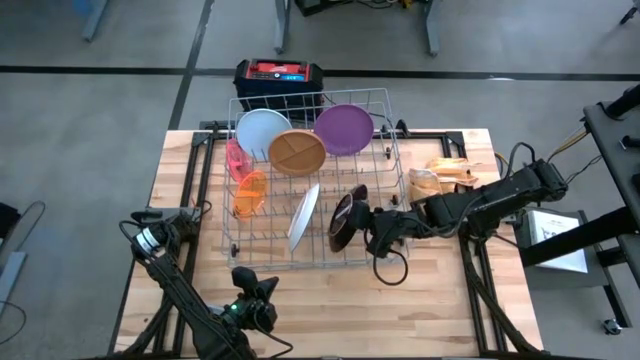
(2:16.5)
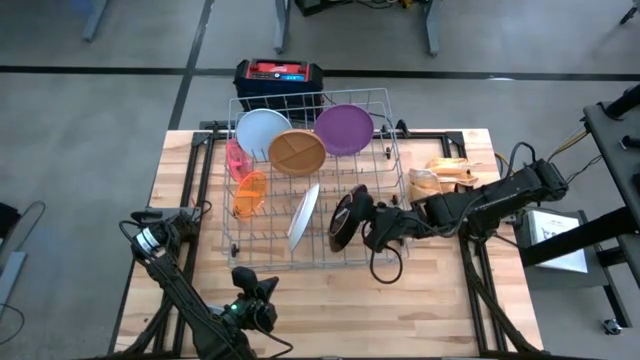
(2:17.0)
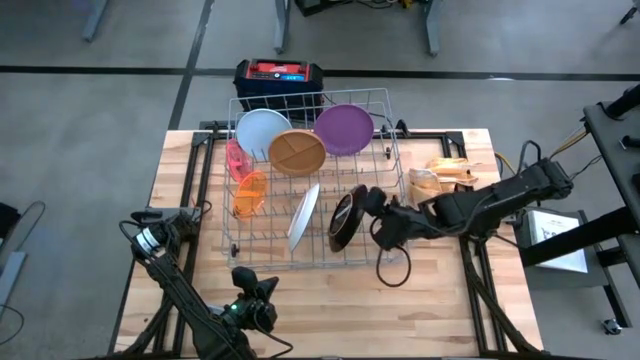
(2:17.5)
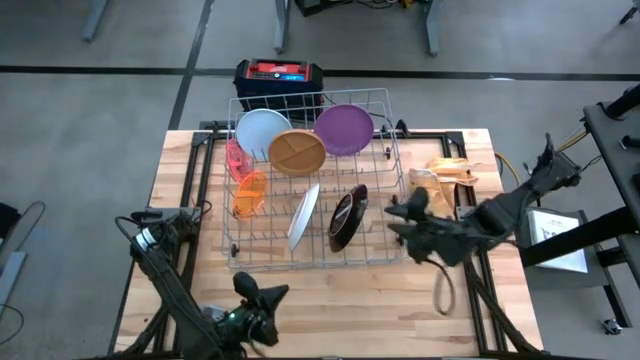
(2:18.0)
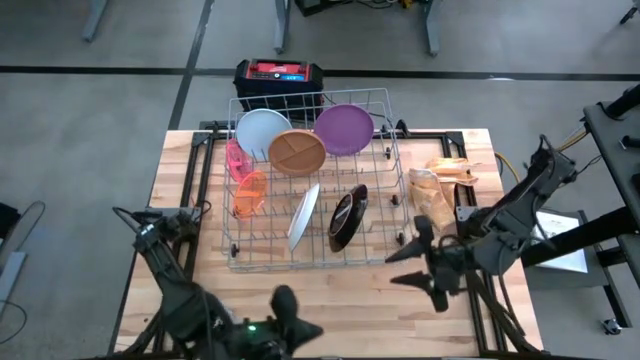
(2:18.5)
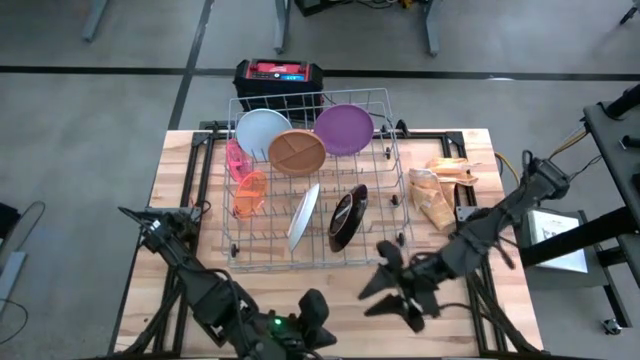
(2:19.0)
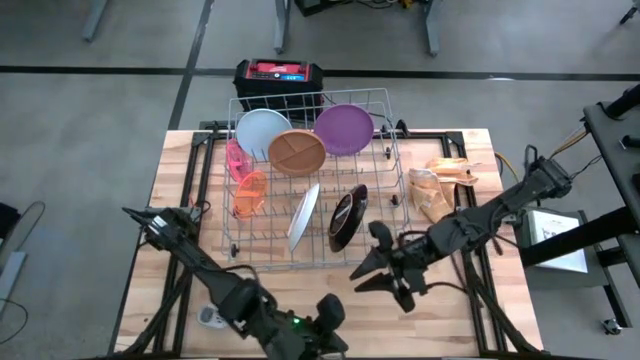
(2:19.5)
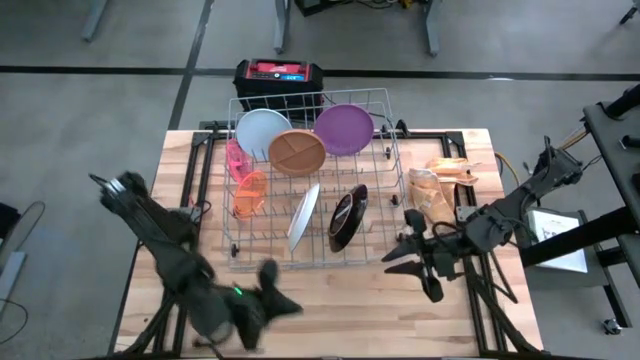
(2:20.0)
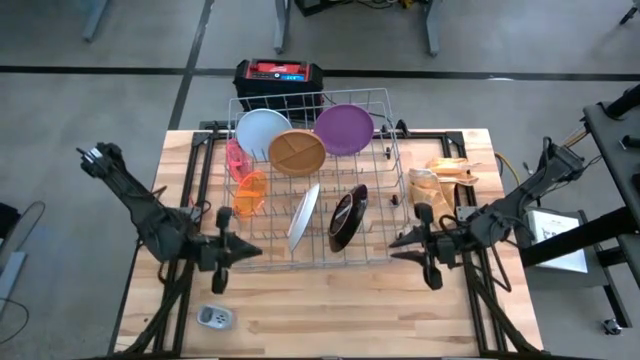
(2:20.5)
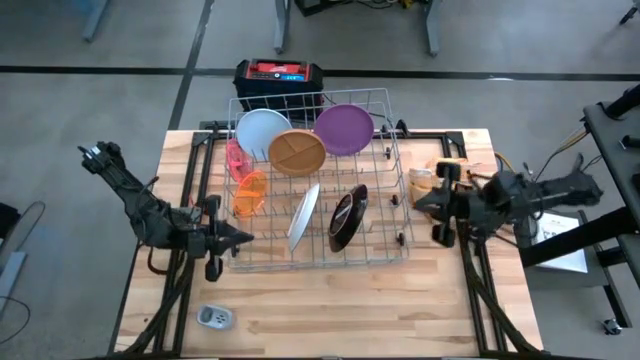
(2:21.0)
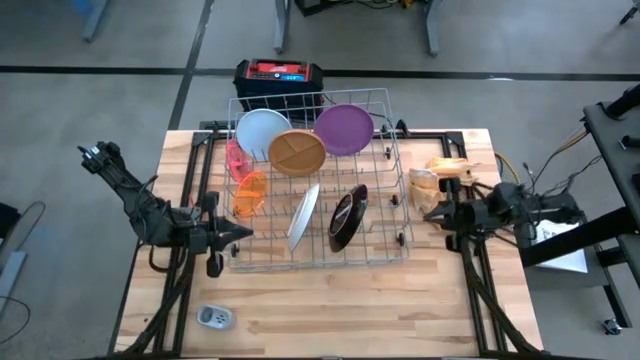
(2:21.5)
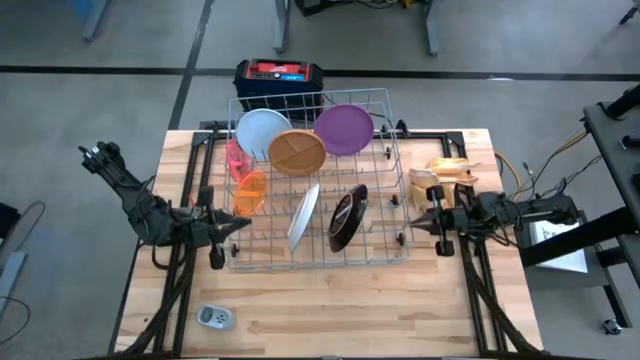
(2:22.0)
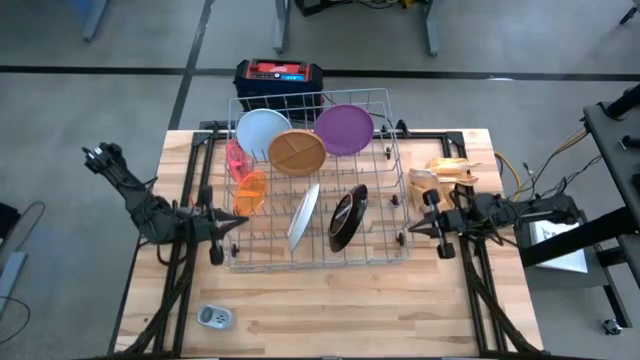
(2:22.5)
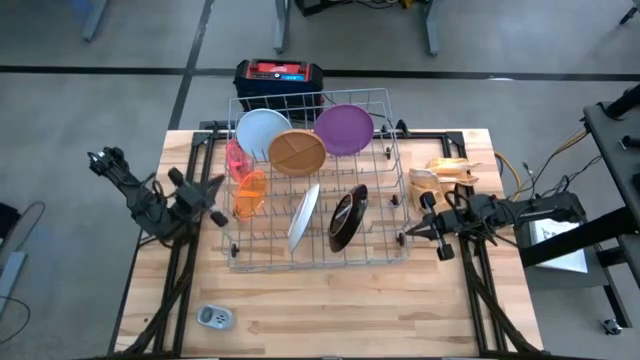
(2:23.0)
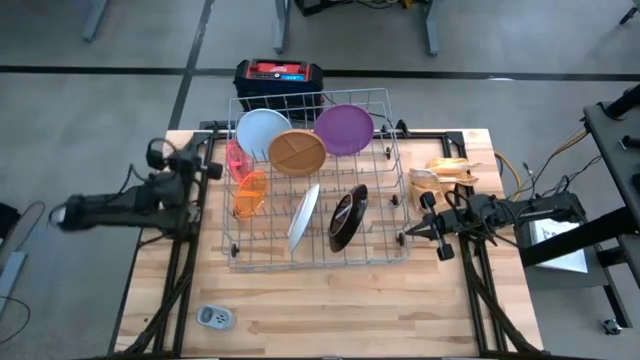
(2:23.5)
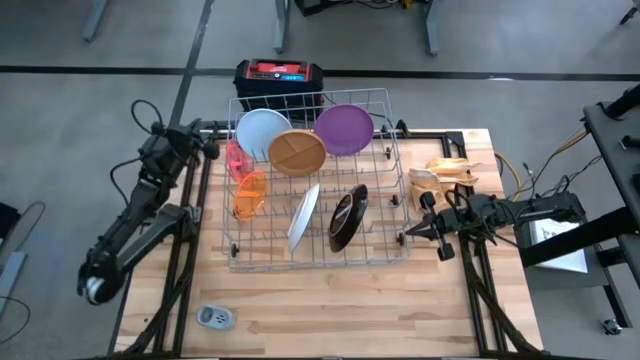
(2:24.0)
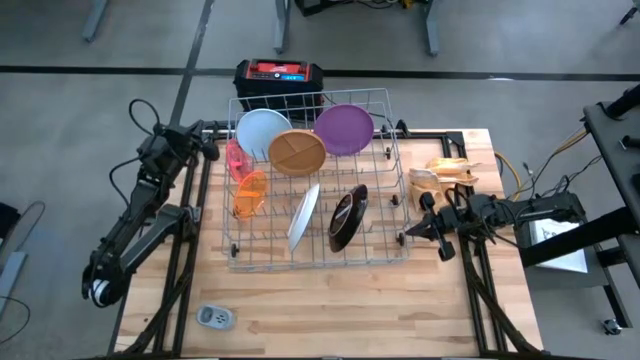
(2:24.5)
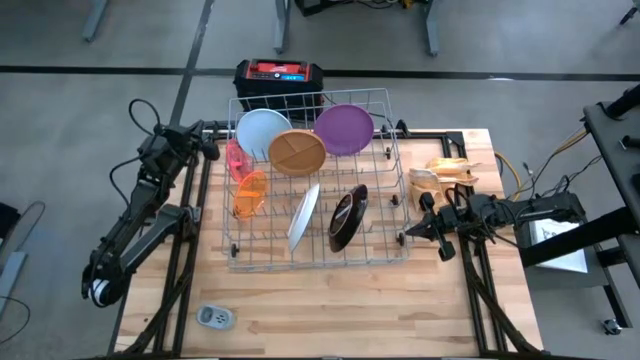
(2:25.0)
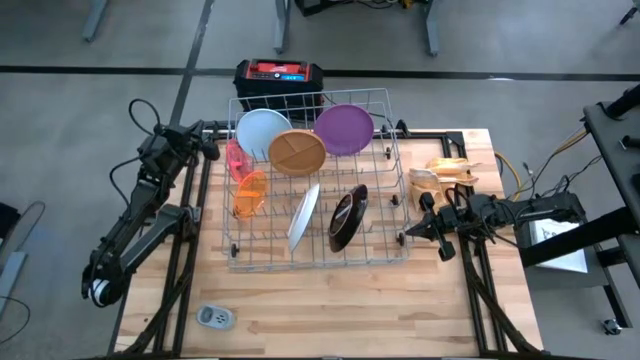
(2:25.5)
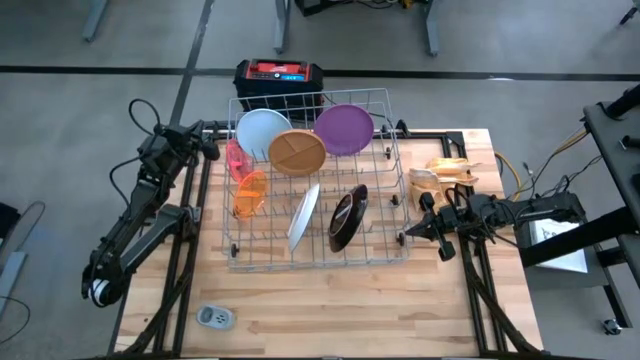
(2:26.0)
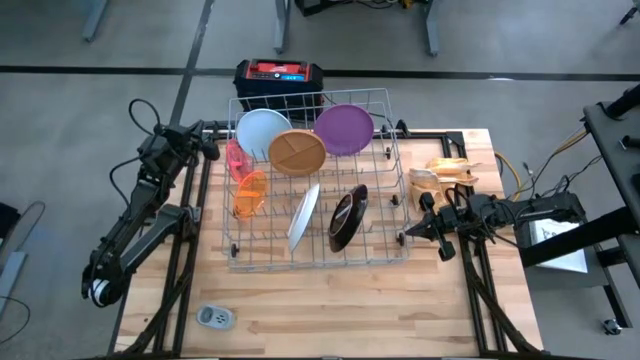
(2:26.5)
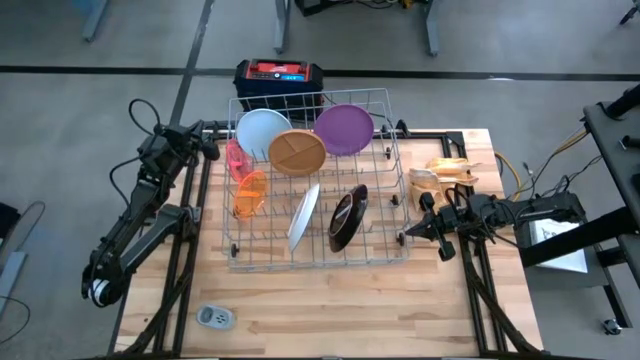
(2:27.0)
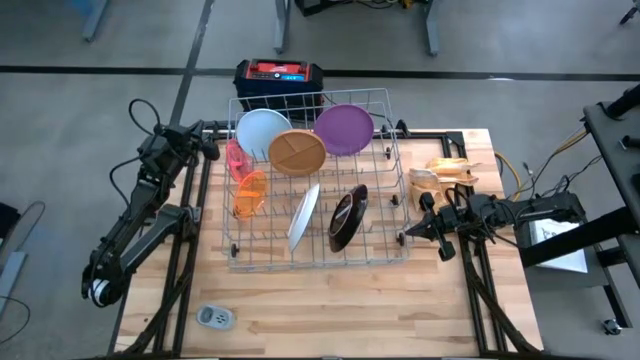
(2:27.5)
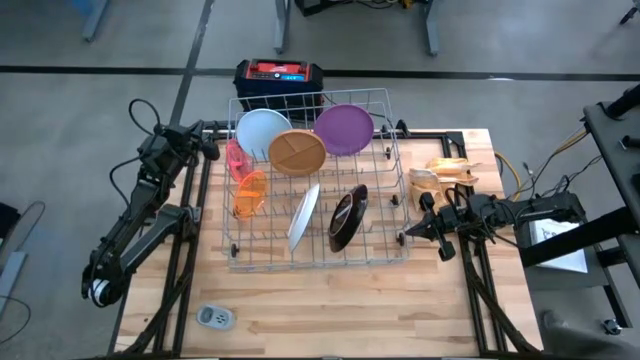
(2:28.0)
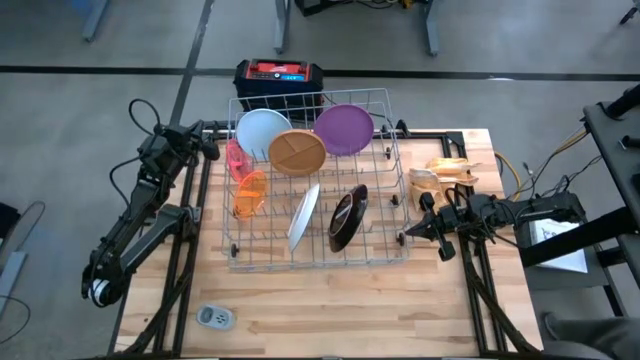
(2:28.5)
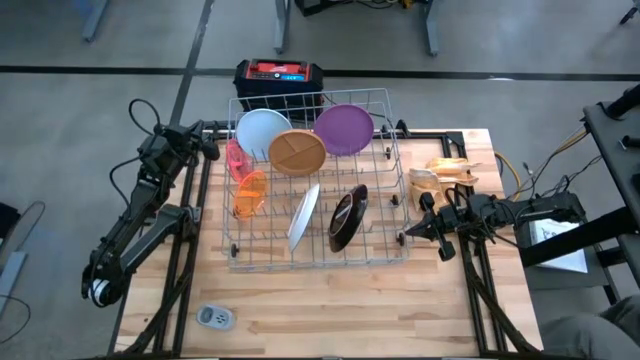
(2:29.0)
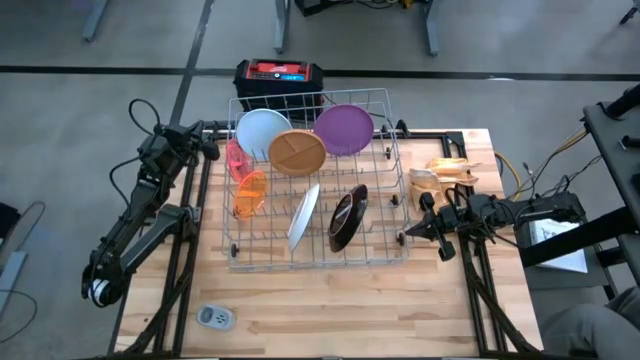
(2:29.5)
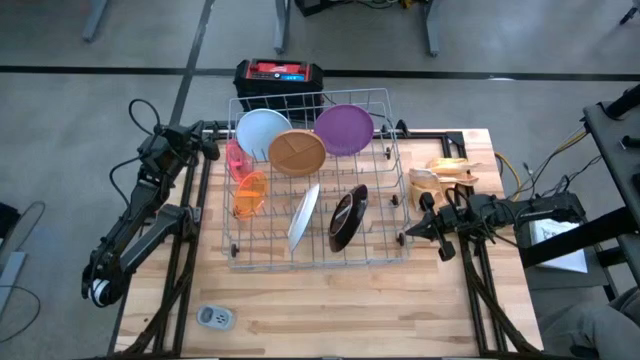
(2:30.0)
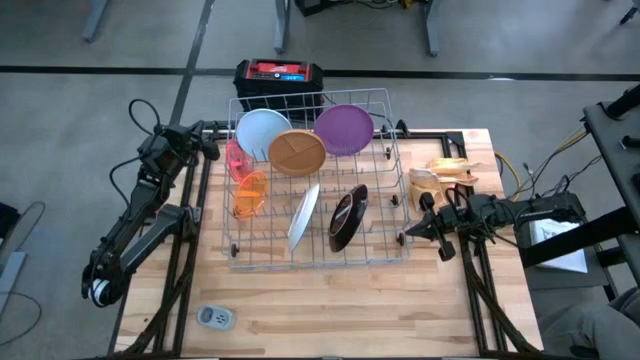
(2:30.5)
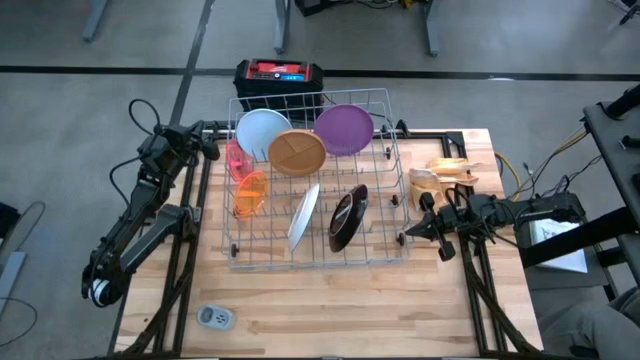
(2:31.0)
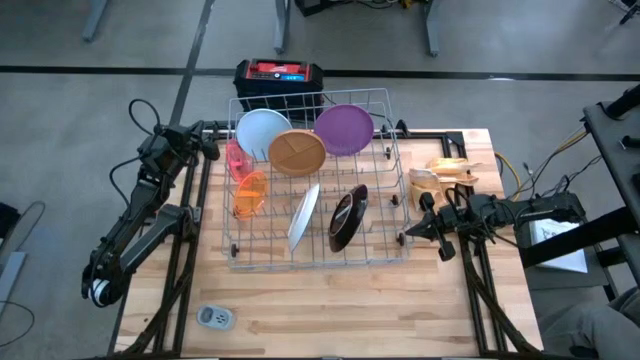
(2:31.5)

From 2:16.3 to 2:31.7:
Task: Sort dishes
Return to Home Position

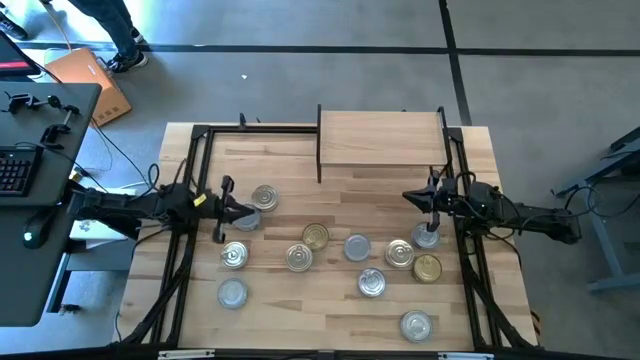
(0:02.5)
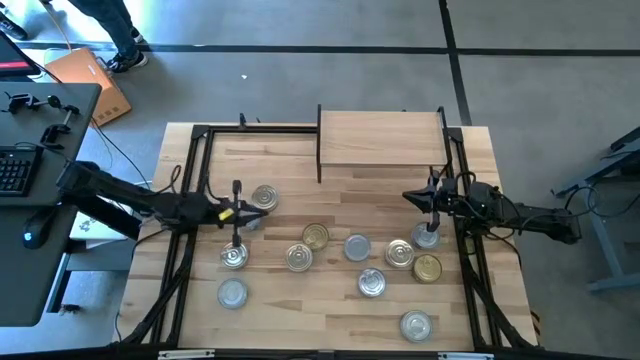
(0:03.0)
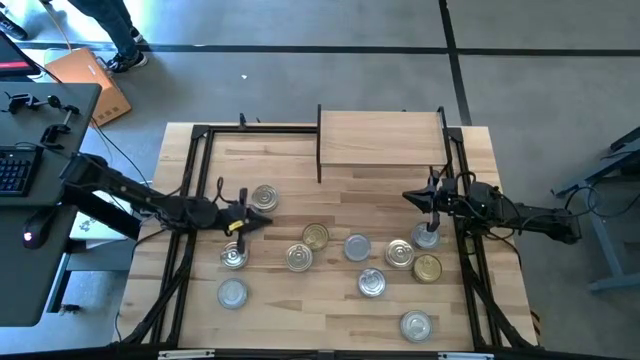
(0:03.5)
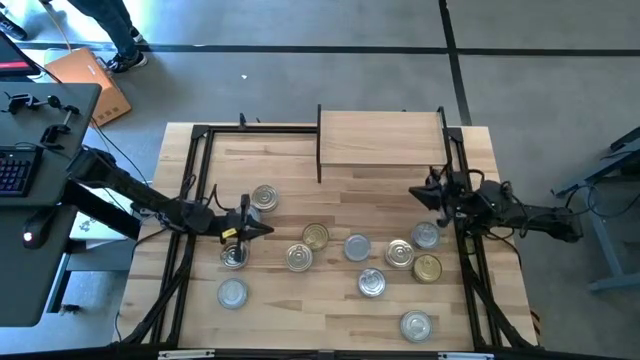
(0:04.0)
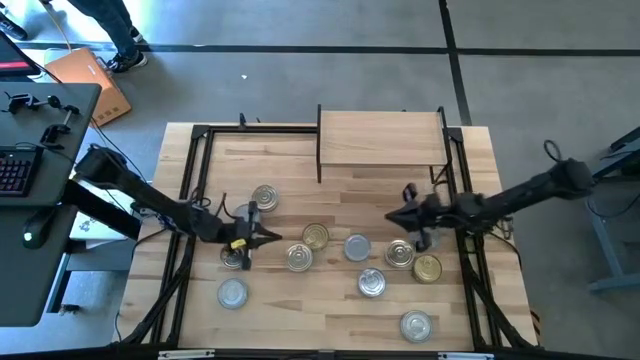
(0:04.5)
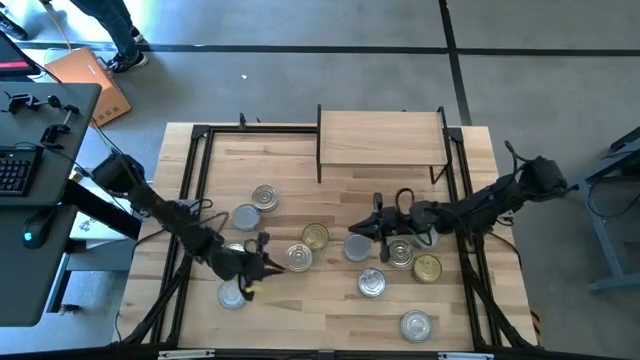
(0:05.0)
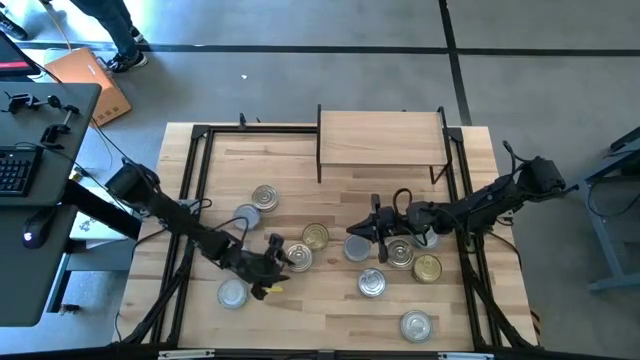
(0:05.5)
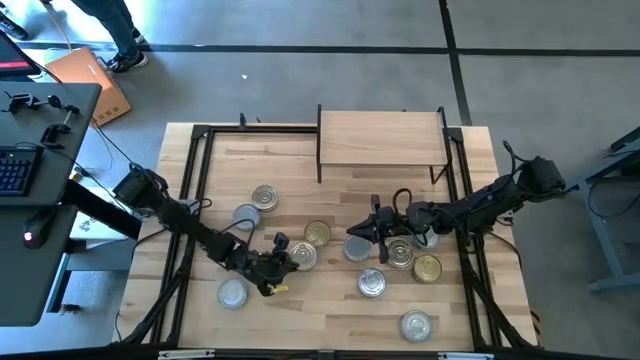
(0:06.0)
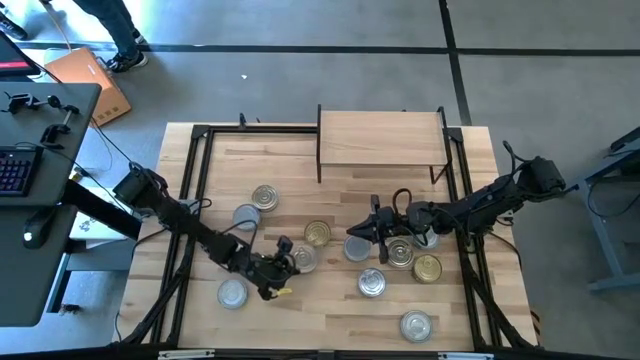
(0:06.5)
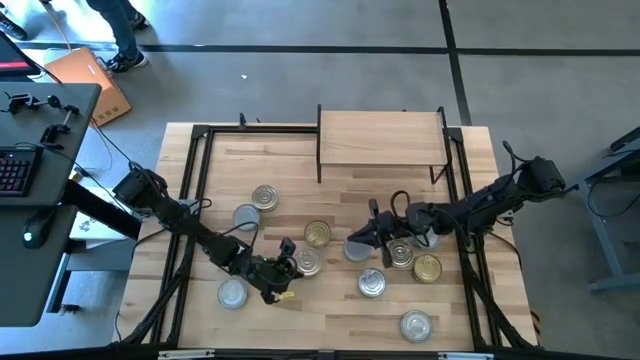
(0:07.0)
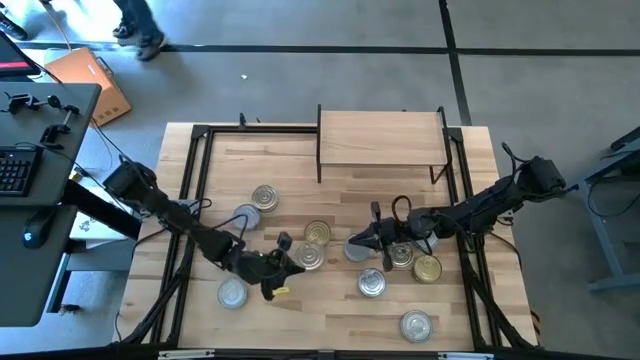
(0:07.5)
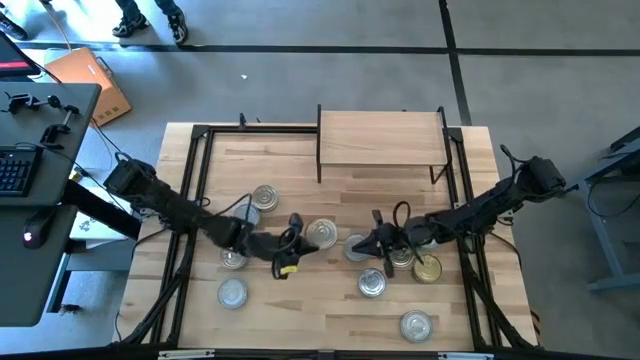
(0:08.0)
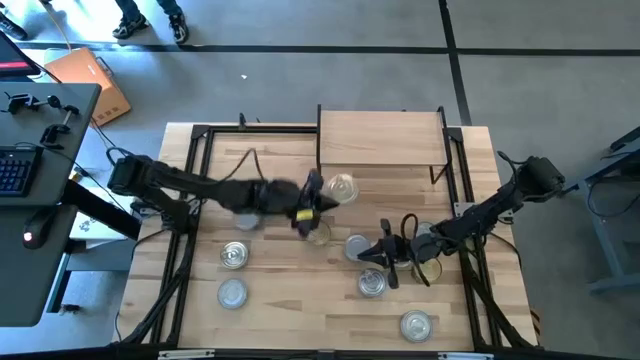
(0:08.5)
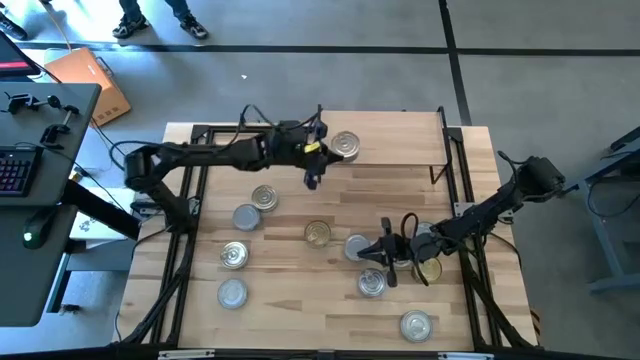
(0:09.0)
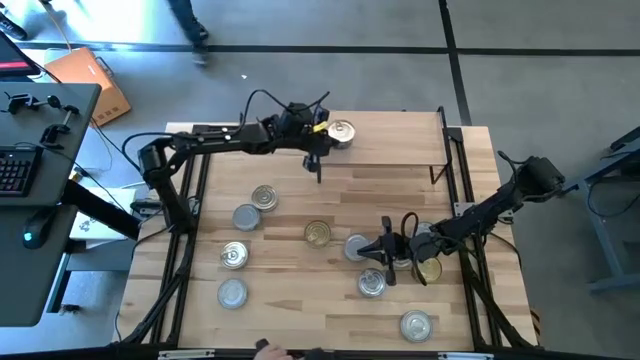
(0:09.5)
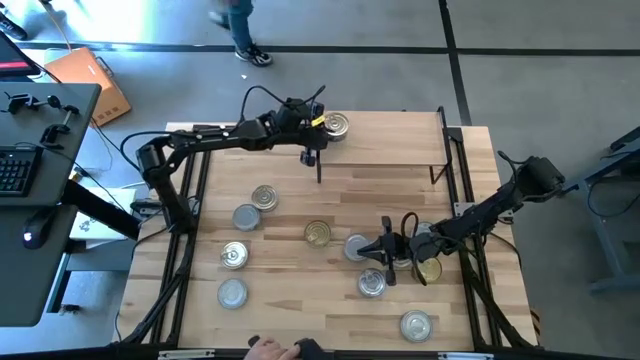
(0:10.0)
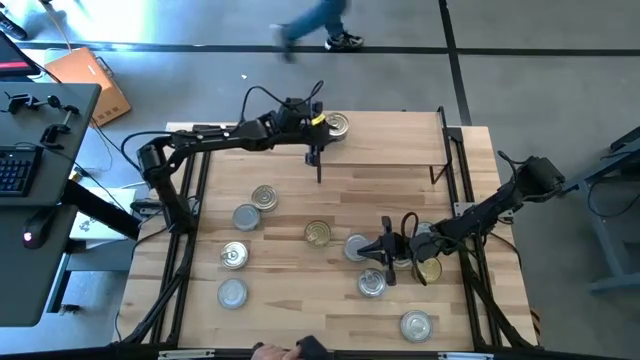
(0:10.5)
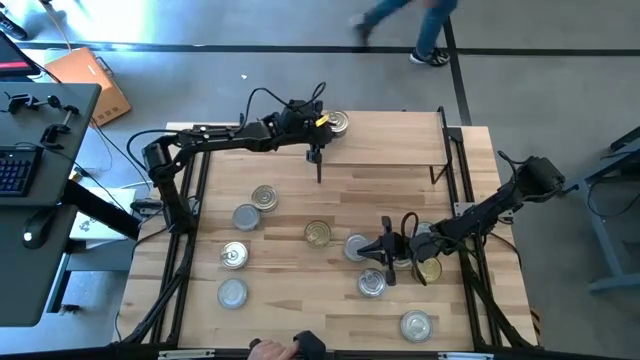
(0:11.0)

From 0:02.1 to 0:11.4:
Task: Stack canned seafood by type on shelf
Put the blue tuna can on the shelf
